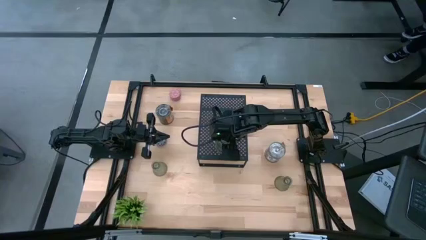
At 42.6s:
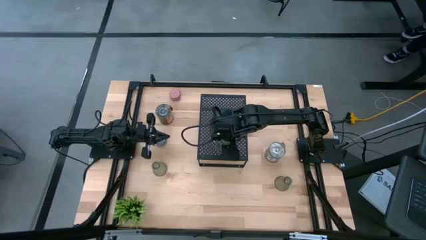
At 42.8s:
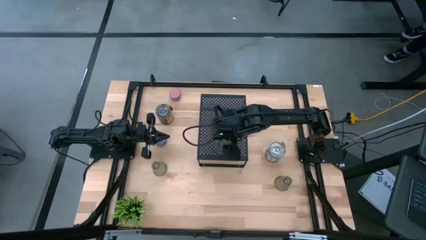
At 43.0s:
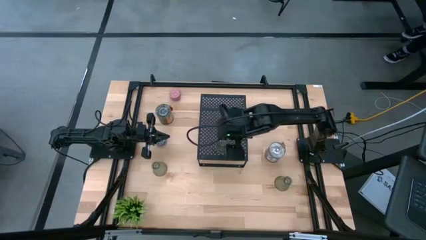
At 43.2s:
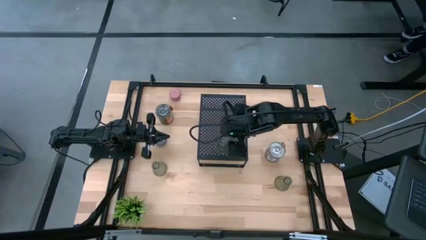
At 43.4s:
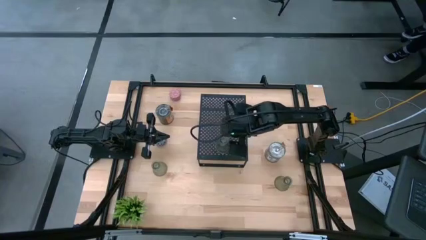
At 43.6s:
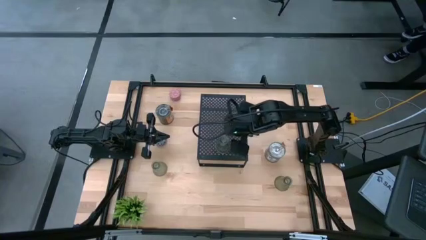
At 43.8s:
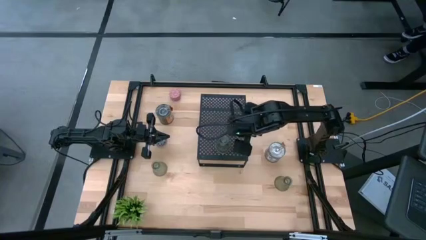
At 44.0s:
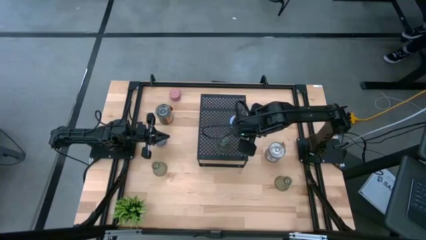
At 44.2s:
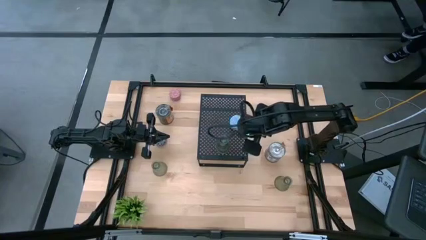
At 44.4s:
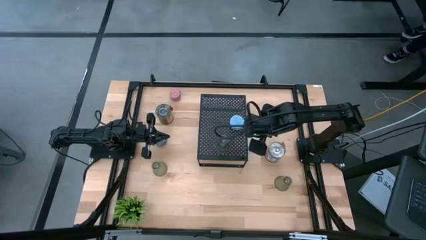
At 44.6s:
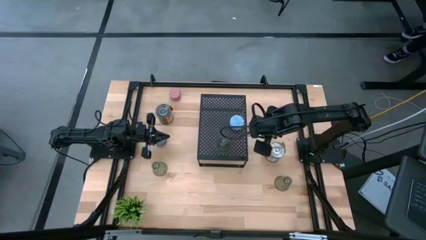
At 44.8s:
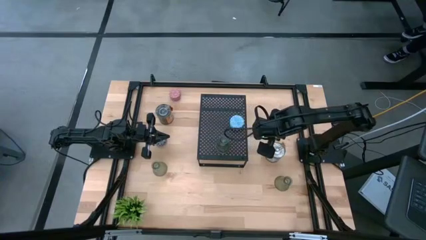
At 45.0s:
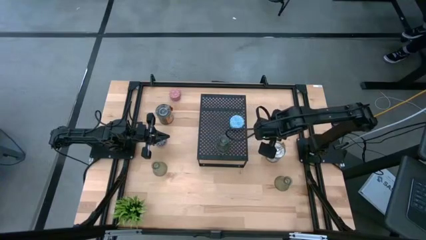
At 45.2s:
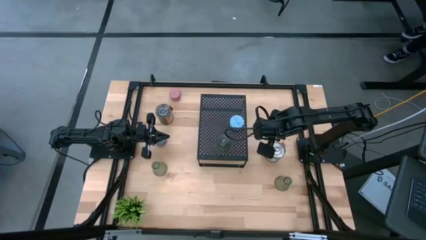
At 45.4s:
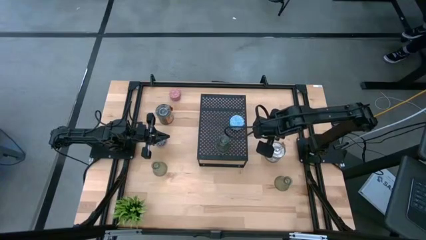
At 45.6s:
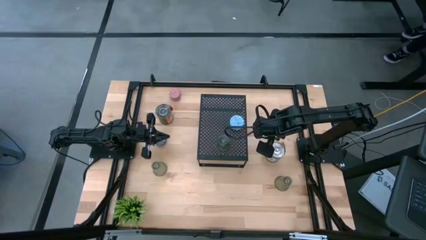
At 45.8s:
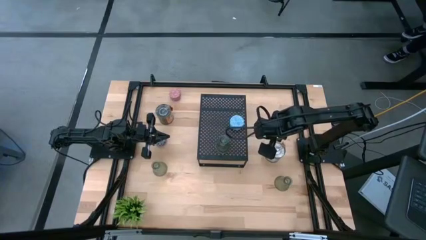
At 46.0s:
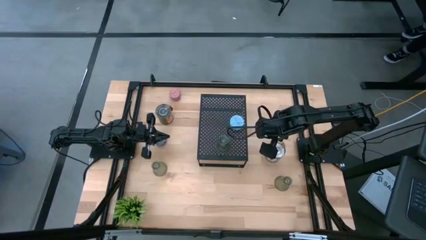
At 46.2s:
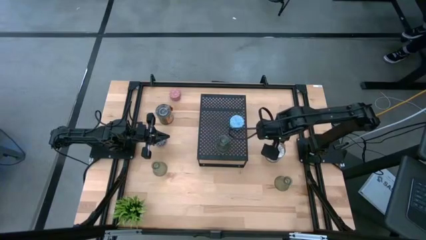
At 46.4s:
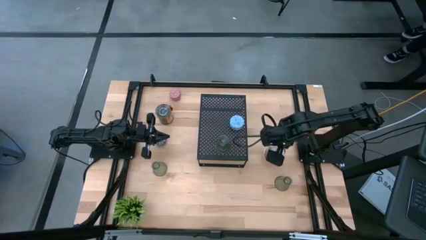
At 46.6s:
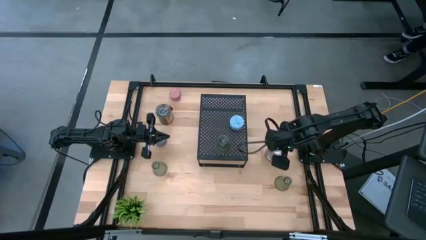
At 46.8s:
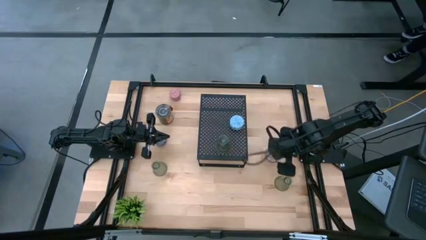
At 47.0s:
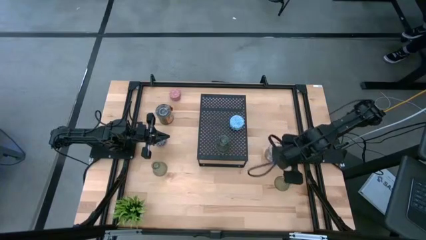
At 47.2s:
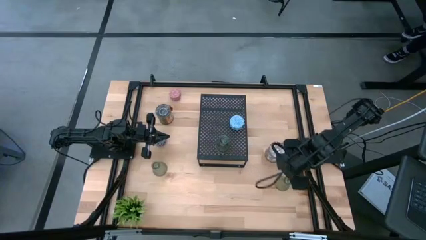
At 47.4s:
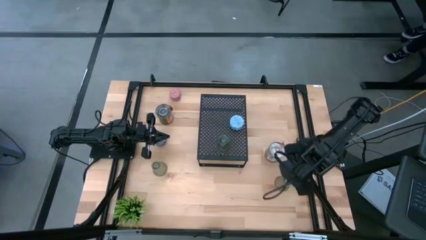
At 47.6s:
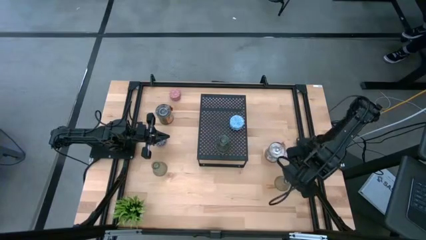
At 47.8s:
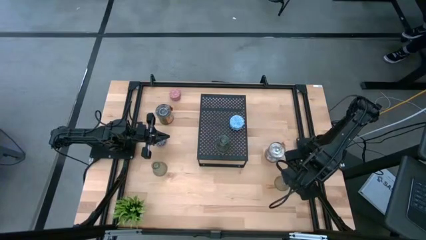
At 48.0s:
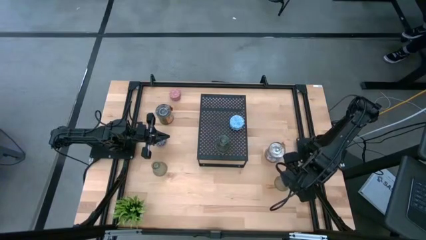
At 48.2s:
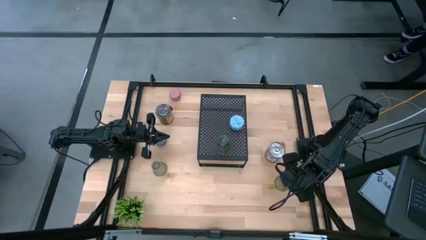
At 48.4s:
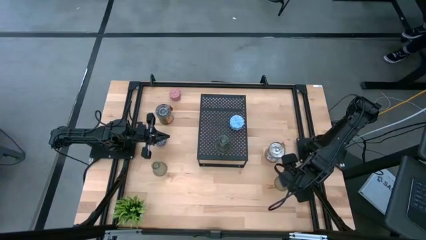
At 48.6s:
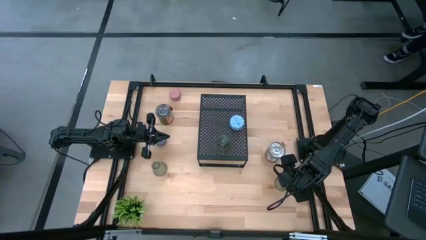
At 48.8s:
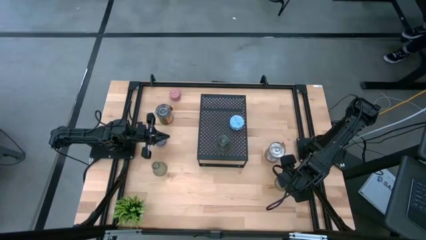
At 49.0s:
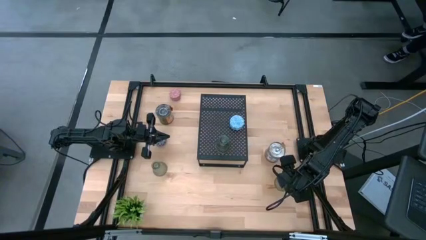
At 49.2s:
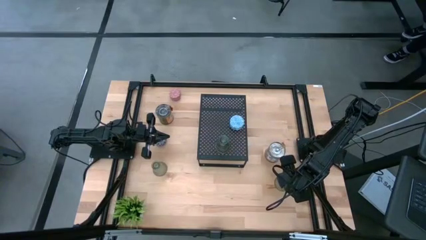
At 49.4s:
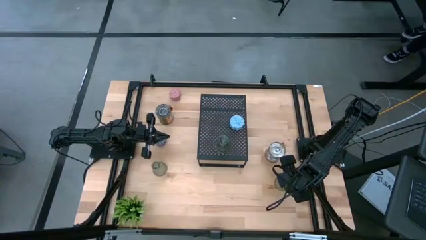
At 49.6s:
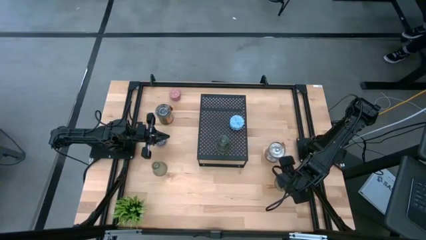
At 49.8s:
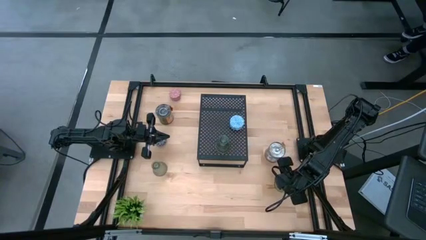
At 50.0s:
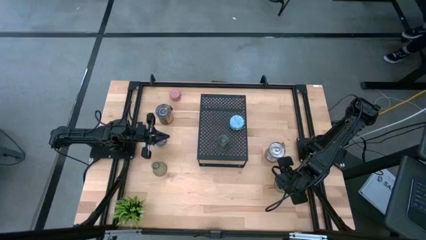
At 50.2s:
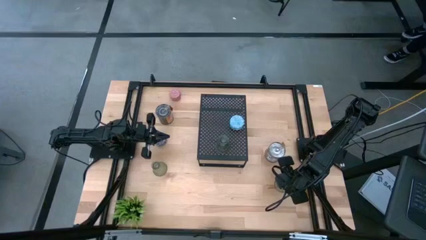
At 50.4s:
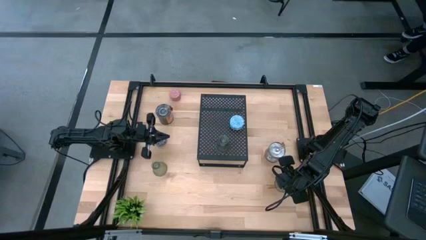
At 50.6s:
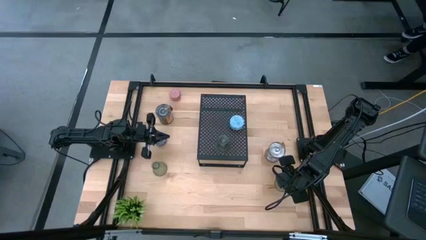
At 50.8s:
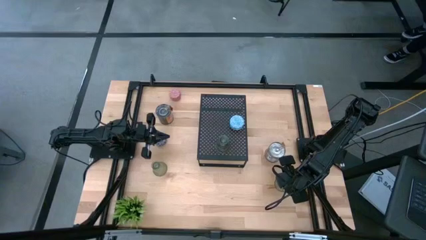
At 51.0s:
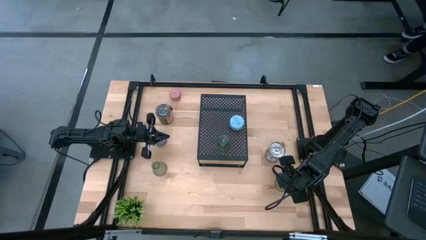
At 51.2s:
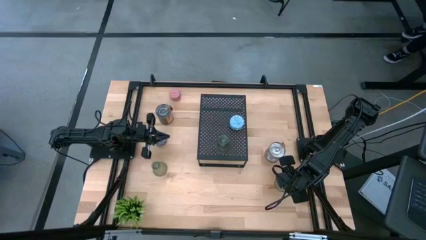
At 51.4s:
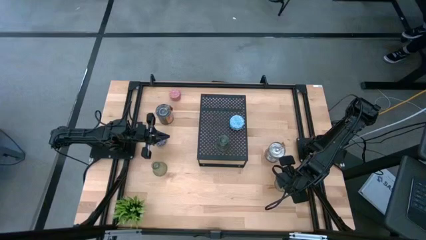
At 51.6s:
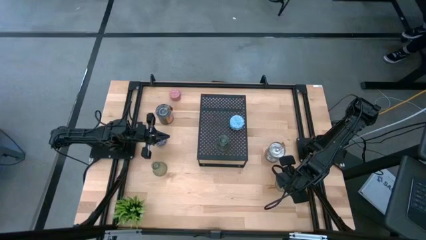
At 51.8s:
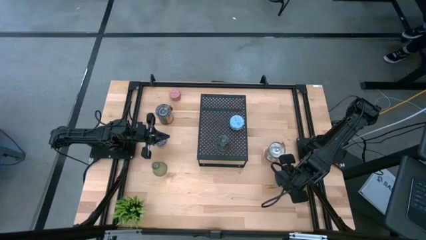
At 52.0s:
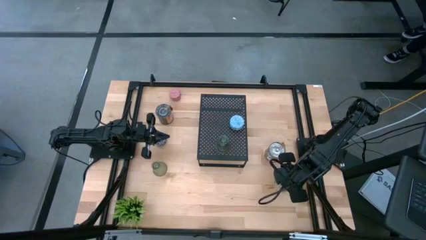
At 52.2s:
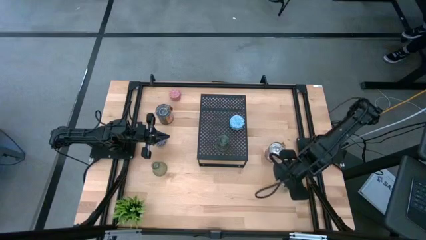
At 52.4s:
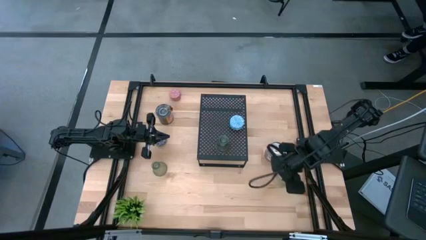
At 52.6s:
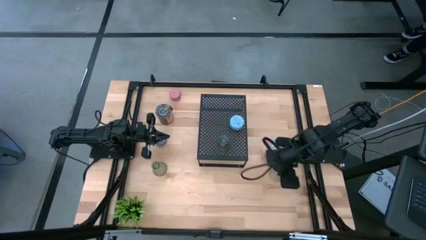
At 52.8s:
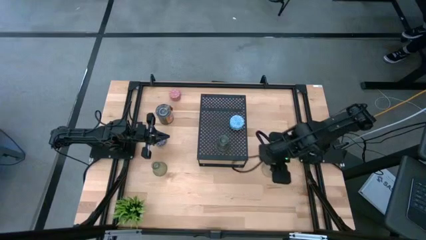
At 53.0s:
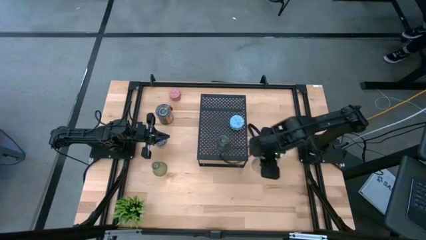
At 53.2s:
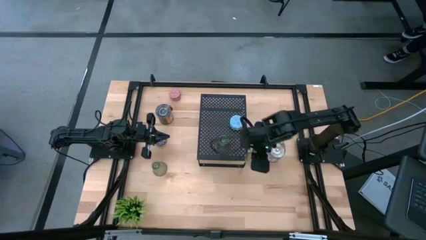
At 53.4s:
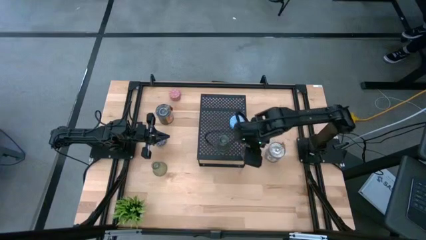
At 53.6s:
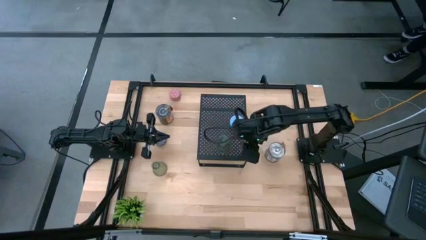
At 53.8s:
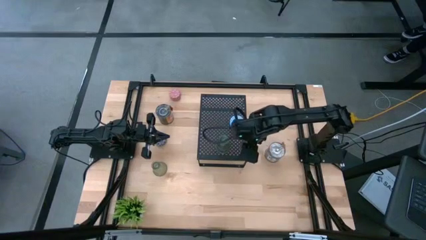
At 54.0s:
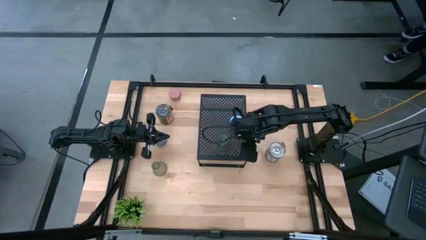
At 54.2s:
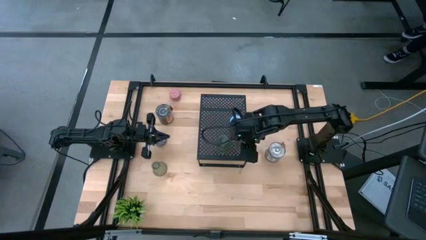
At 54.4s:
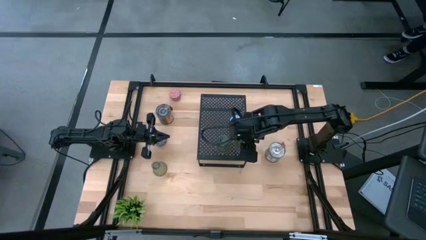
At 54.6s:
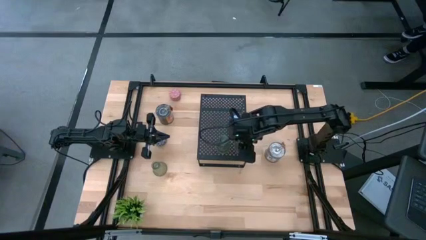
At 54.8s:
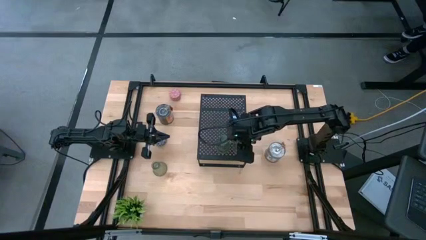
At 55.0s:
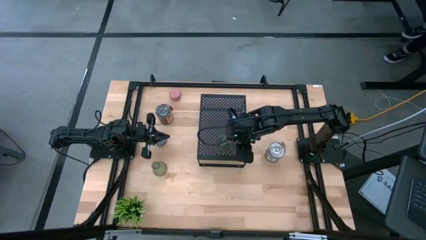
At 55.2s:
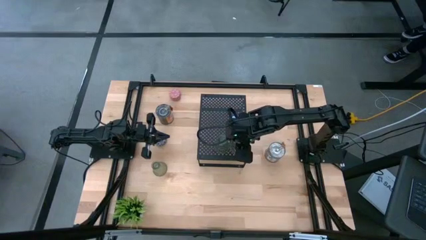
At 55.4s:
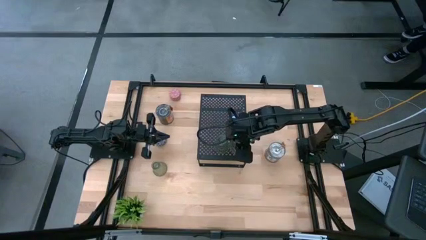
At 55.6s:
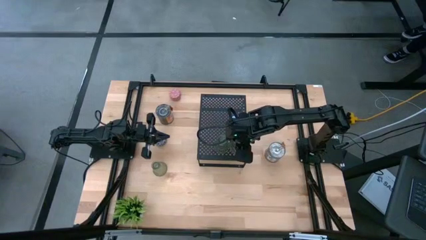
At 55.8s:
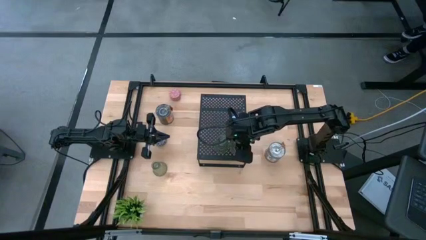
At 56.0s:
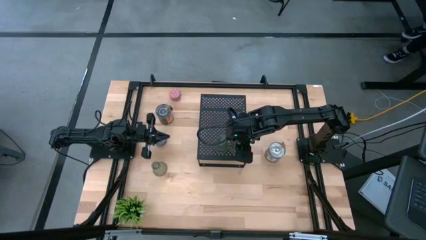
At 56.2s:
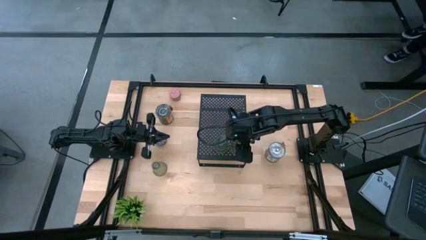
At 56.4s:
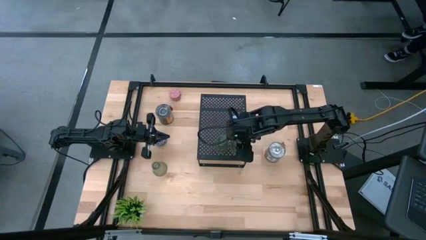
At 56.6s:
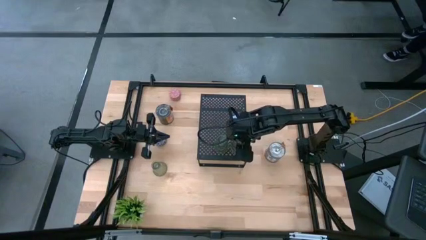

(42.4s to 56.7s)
Task: Pick & Place candle stick holders
Put the bottom right glass candle holder on the shelf aligned with the other glass candle holder
